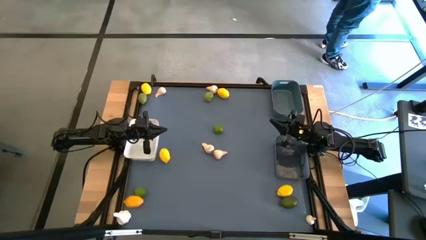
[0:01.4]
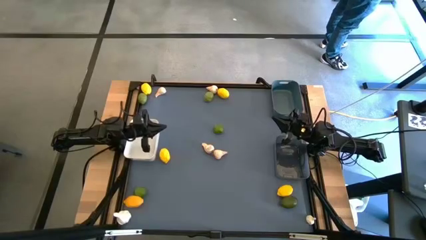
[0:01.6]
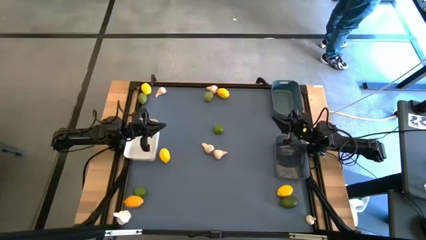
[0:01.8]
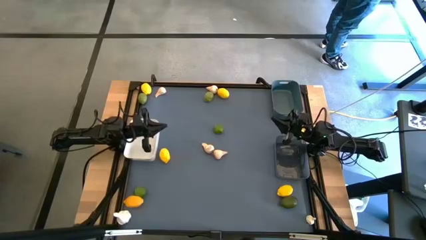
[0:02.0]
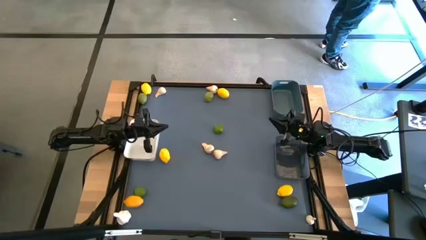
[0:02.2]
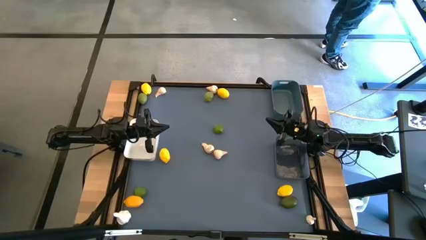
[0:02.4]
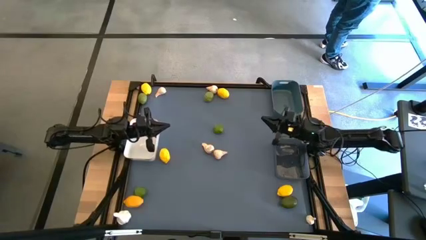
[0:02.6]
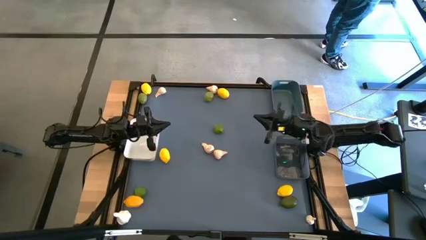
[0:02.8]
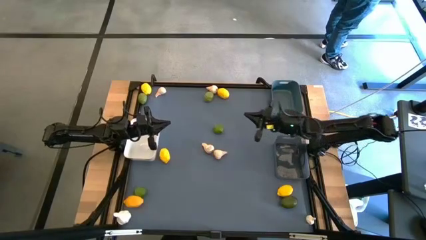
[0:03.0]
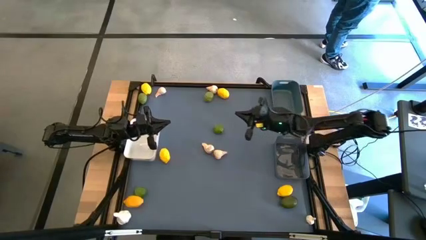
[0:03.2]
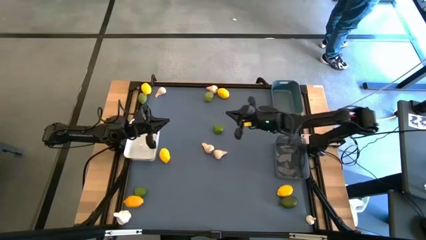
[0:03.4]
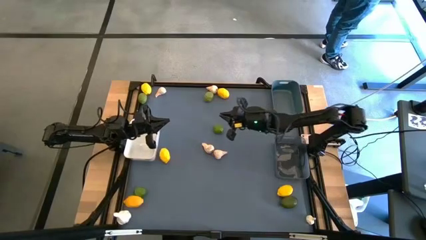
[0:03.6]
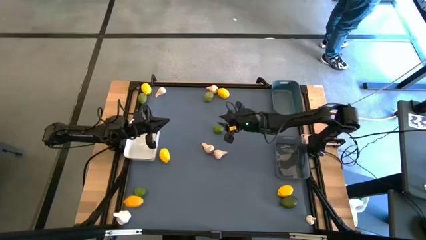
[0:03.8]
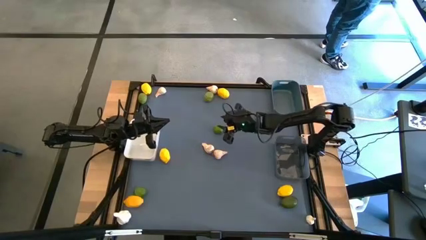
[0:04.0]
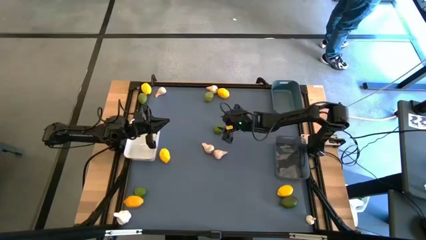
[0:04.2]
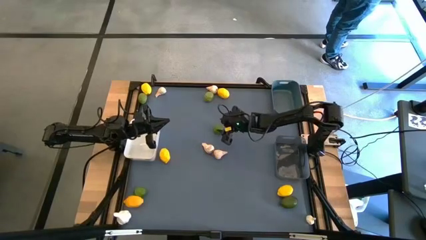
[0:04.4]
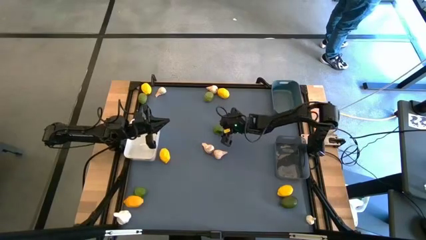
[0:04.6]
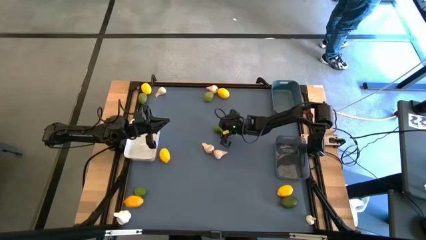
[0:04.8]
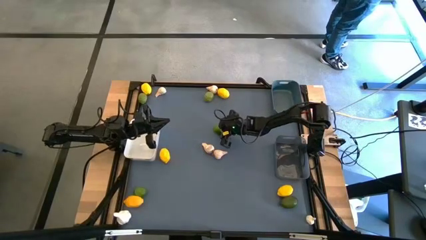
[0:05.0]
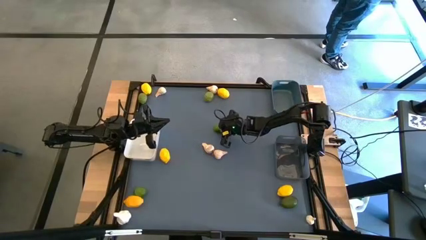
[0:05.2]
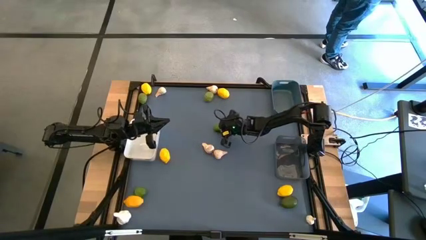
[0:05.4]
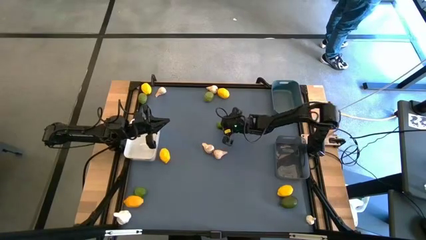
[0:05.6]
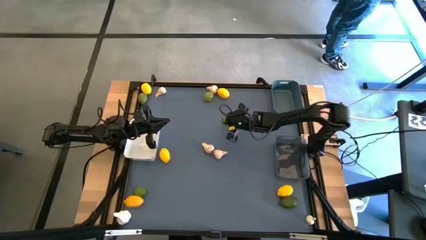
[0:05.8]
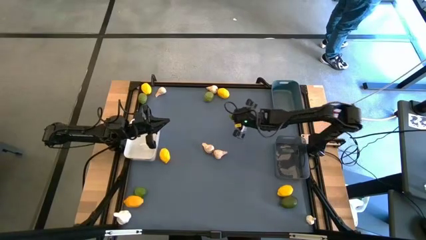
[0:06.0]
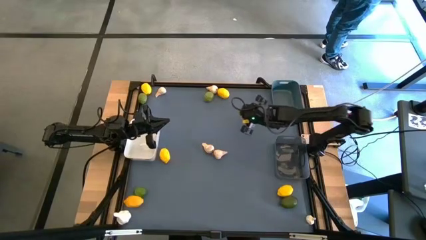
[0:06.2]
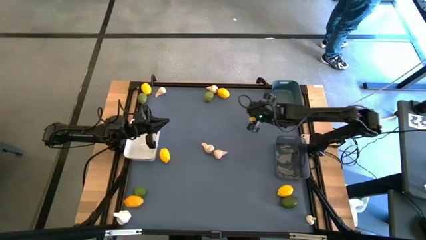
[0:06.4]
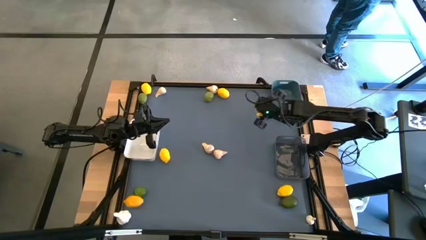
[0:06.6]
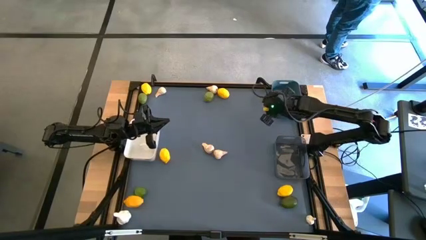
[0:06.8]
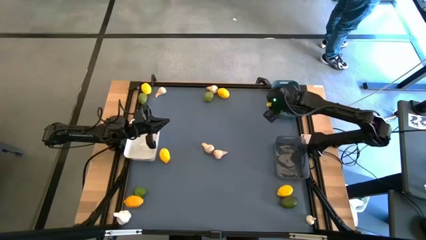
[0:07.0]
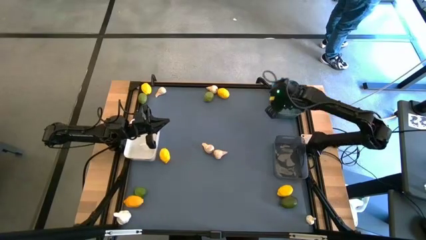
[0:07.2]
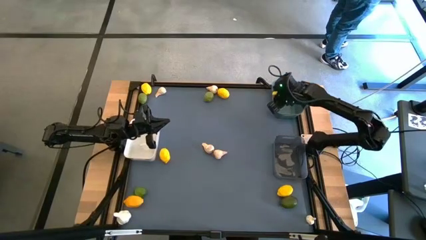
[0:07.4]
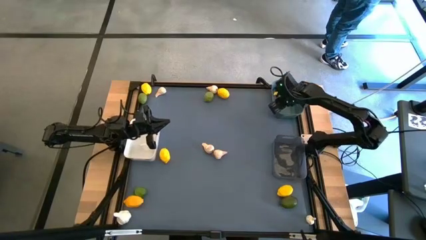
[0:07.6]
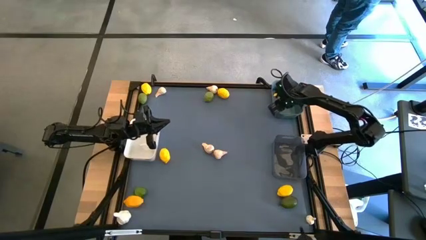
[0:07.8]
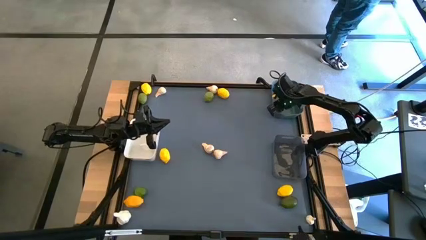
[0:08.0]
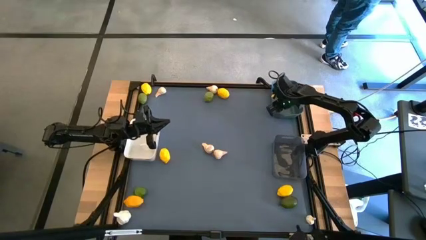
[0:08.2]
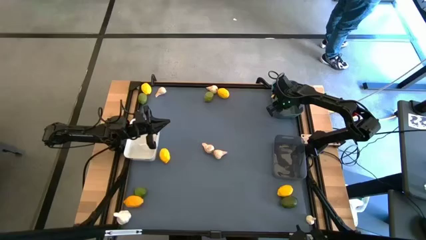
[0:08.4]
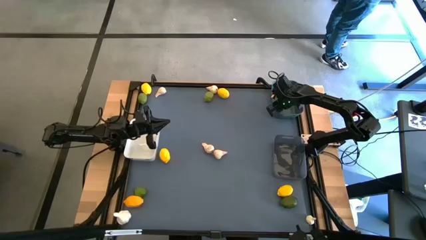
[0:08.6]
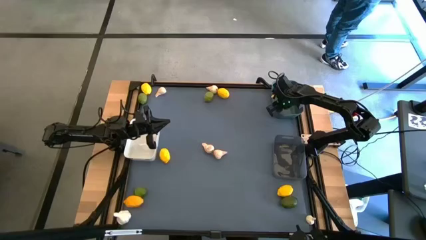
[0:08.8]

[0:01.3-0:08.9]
Task: Sort produce into baskets
Put the lime into the black bin

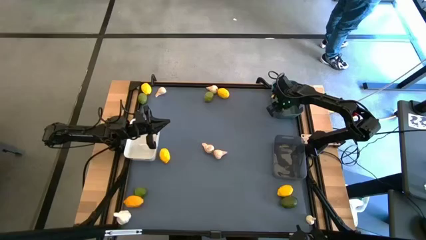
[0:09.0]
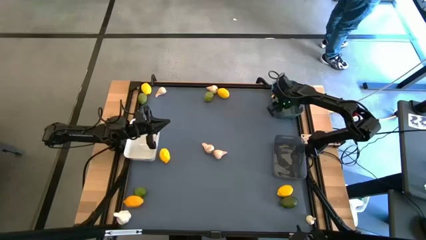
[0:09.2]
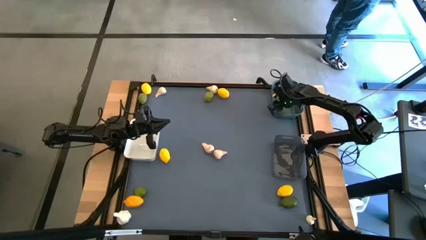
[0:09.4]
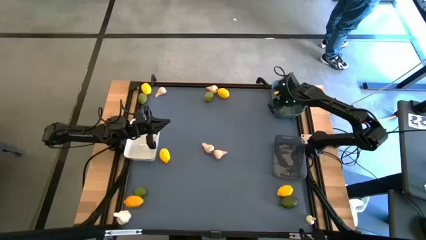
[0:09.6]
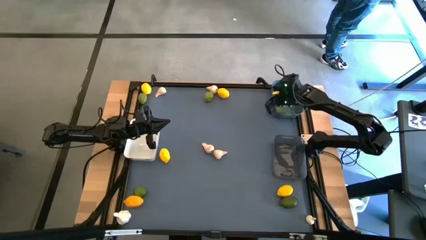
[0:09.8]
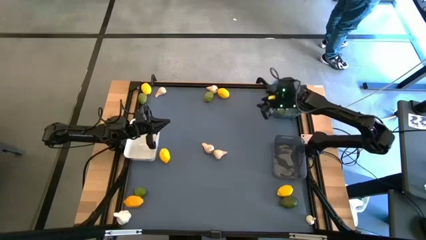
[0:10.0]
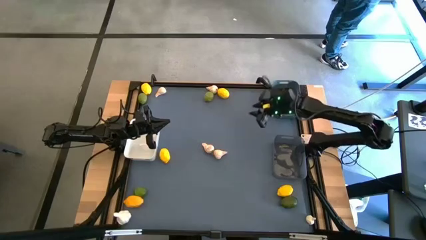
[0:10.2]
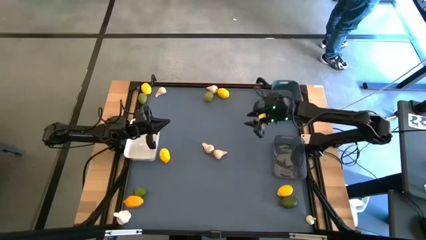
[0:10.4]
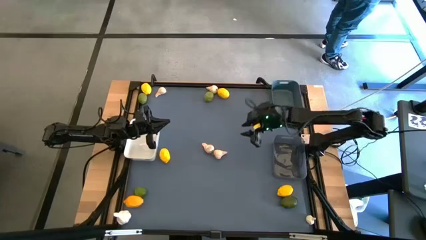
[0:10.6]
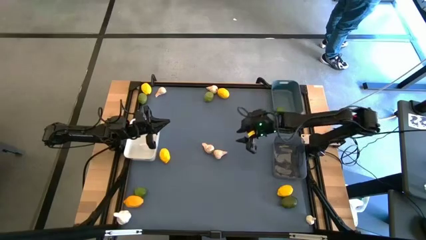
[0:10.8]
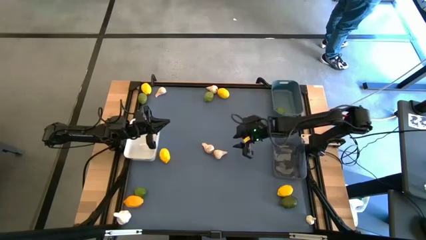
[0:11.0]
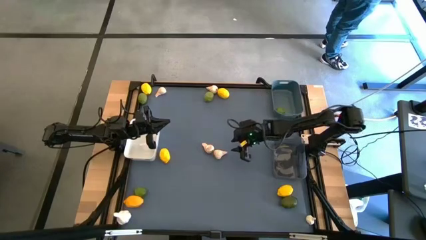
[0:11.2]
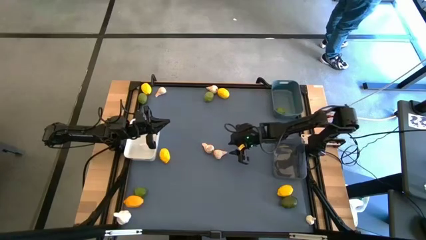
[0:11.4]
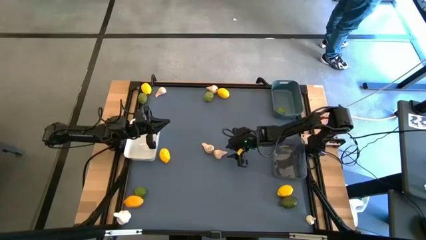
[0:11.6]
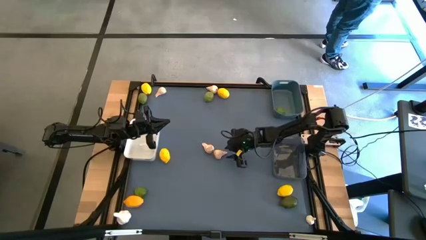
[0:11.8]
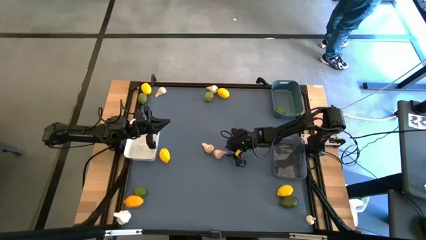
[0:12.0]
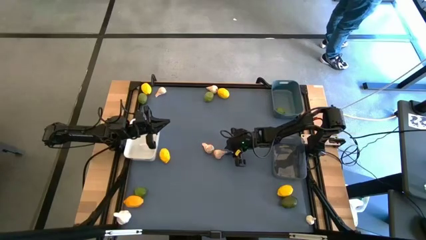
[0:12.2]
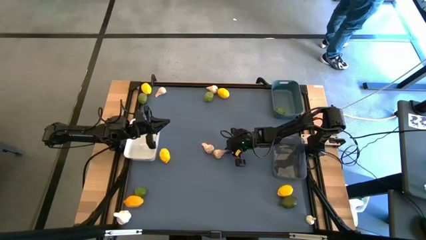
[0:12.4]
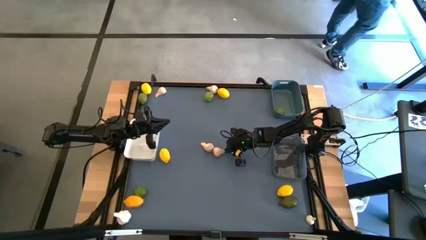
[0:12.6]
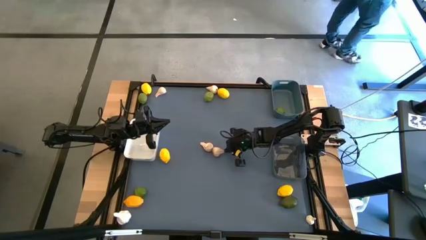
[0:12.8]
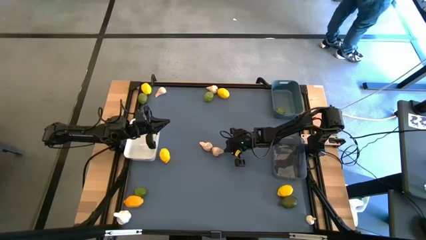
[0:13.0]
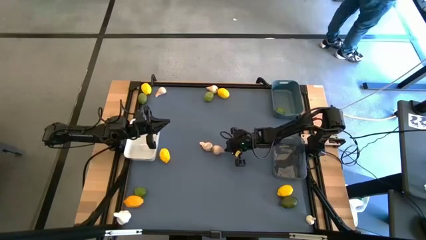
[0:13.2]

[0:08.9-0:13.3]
Put the garlic into the white bin

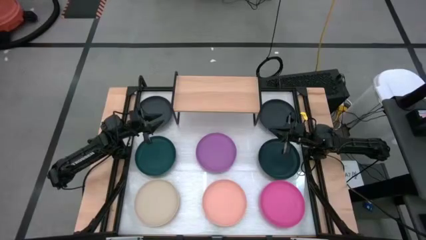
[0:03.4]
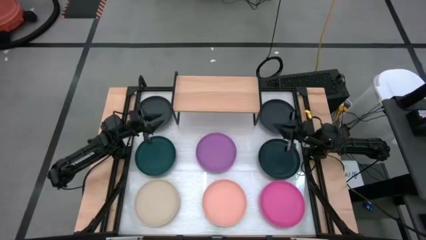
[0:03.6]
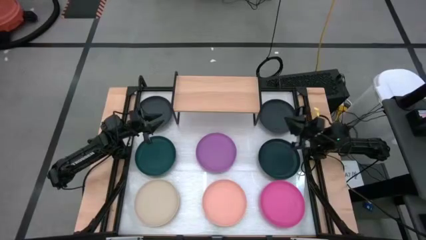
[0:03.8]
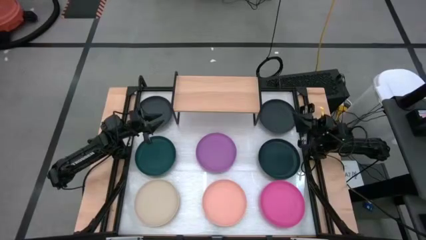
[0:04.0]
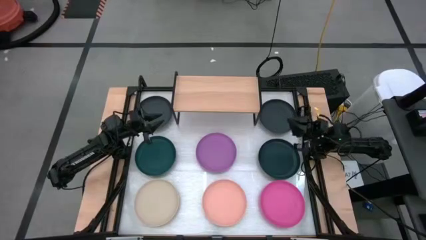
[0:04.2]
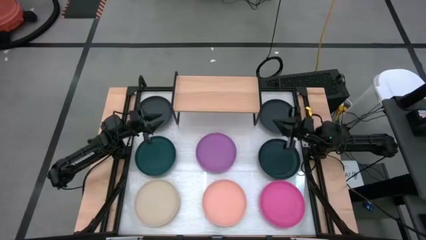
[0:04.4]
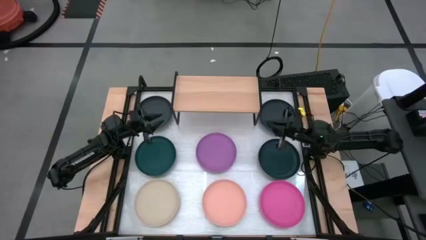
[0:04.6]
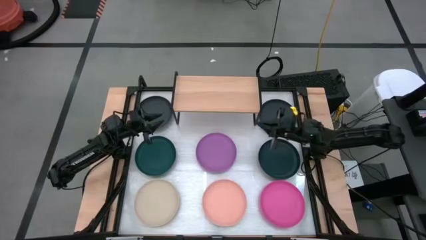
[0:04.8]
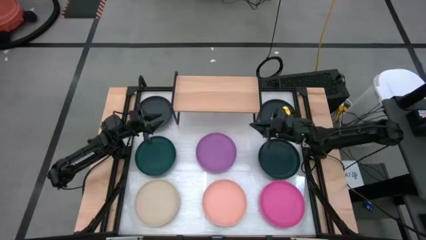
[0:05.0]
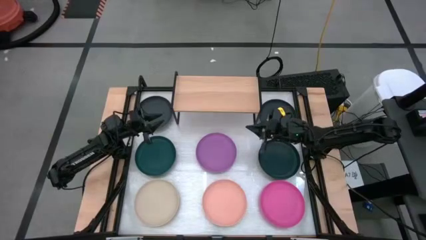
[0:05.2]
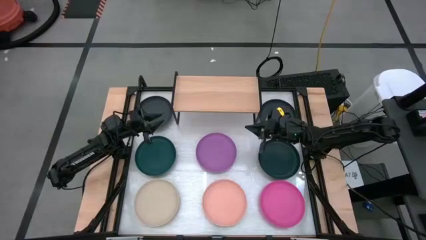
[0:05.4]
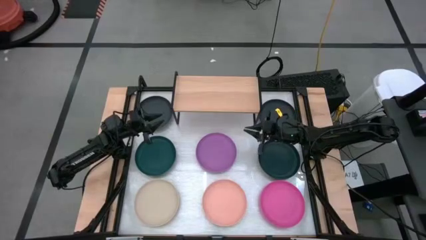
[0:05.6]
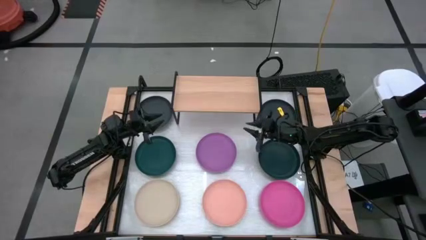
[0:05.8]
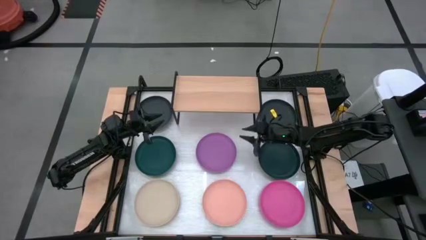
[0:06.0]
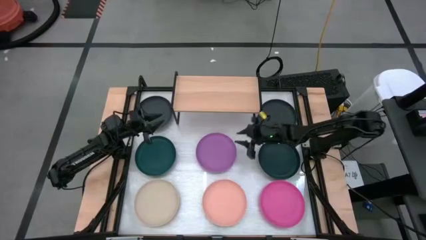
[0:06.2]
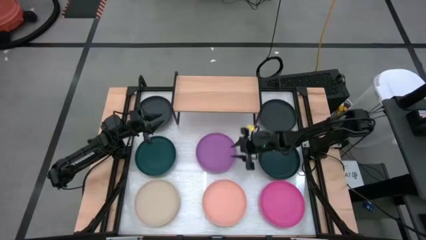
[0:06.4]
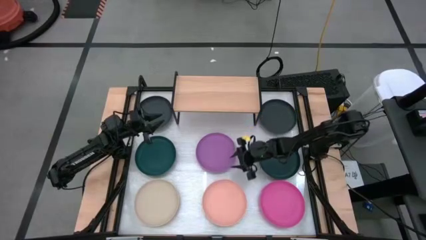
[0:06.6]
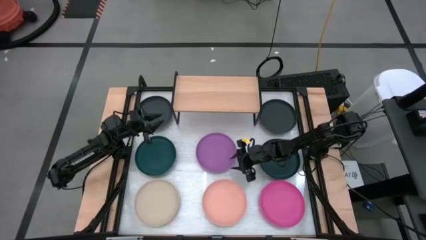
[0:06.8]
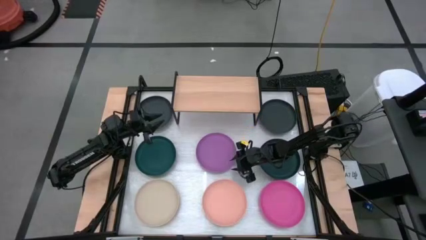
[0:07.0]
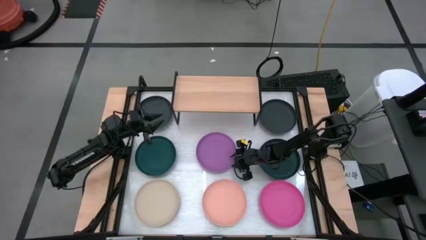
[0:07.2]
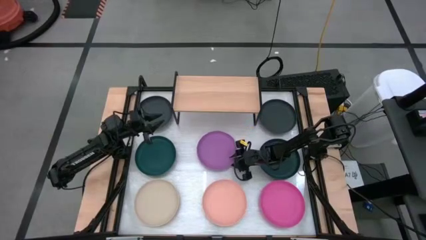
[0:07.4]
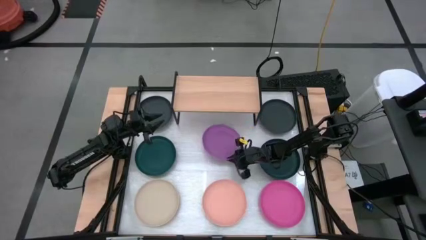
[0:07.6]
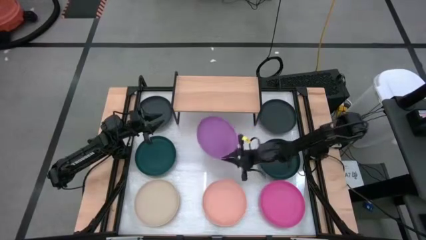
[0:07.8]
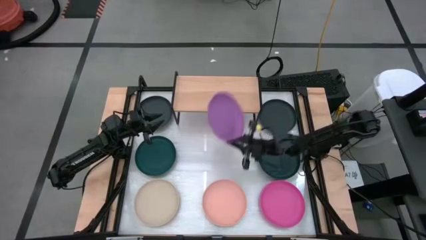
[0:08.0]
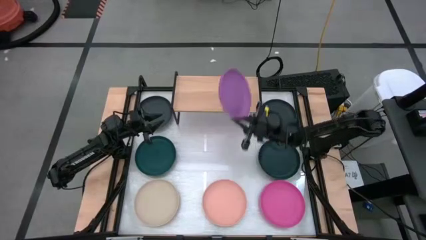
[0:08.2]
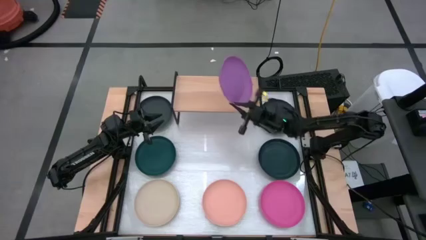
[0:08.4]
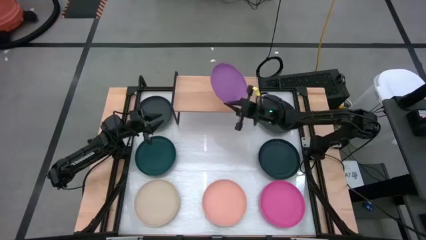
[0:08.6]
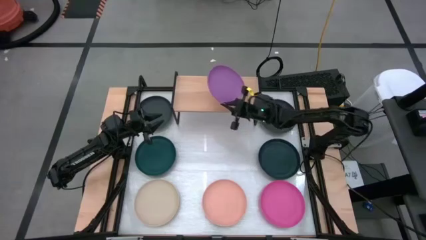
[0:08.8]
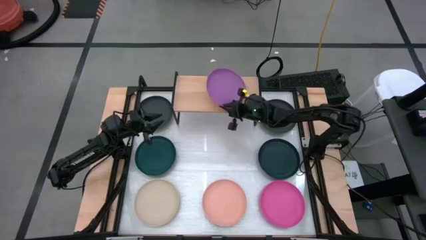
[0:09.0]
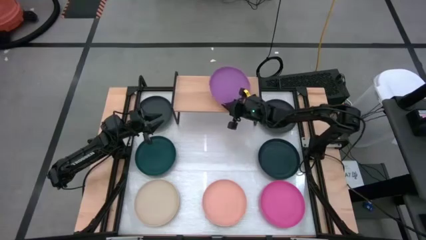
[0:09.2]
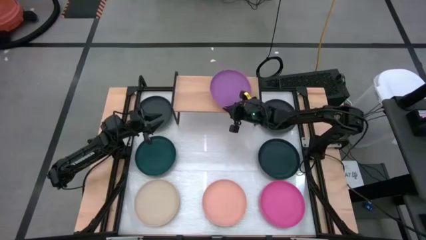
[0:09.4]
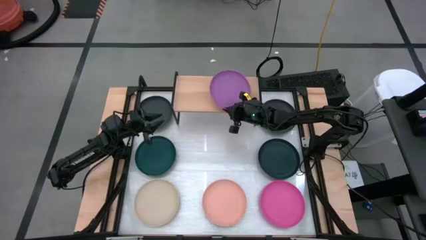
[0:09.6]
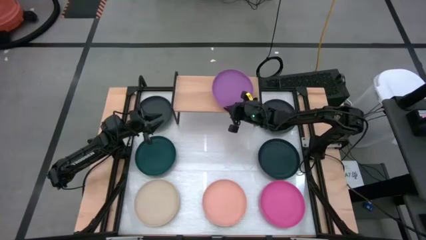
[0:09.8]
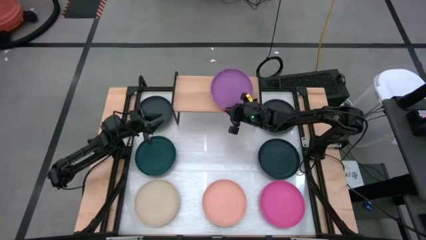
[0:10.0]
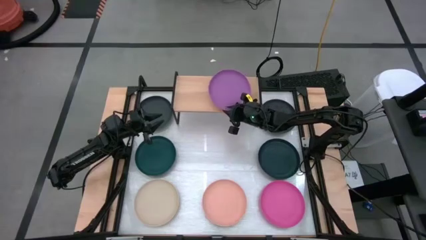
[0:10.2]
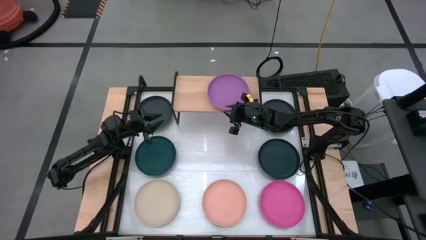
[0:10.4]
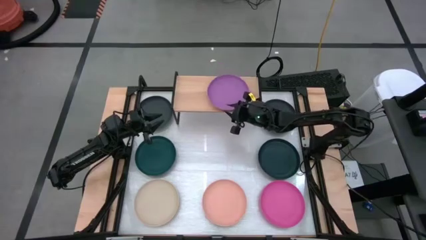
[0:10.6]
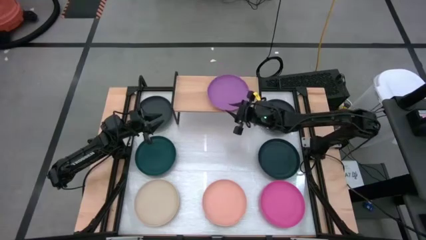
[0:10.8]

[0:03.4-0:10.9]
Task: Place and stack plates onto a shelf
Put the violet plate on the shelf
